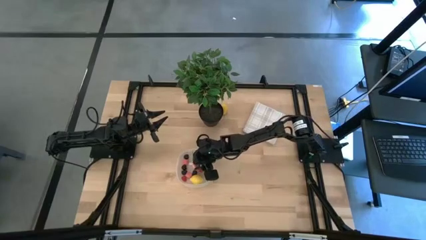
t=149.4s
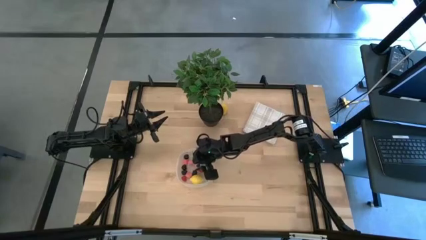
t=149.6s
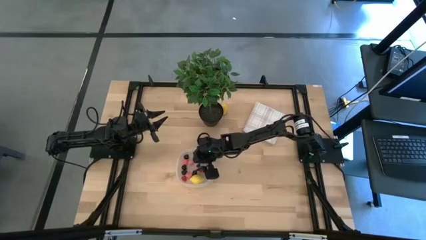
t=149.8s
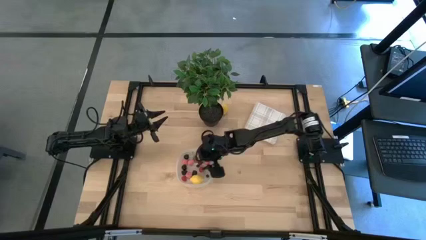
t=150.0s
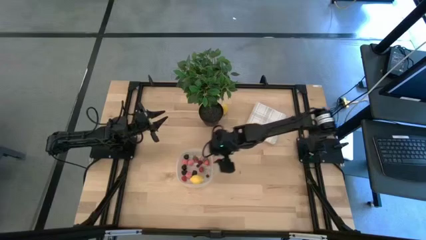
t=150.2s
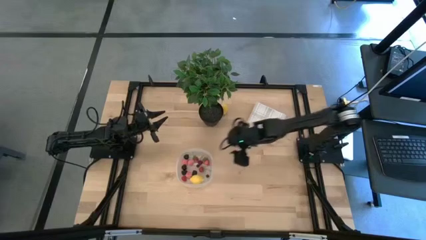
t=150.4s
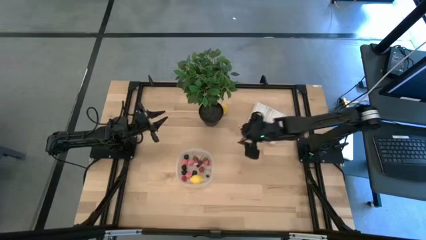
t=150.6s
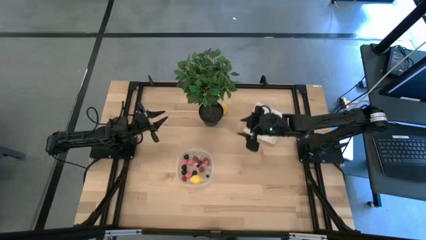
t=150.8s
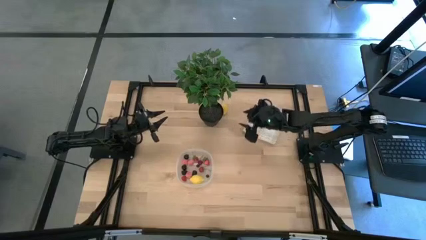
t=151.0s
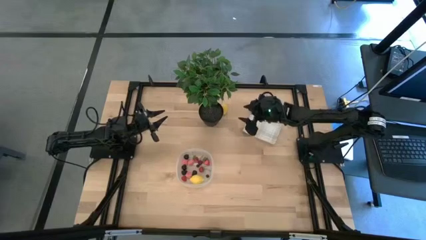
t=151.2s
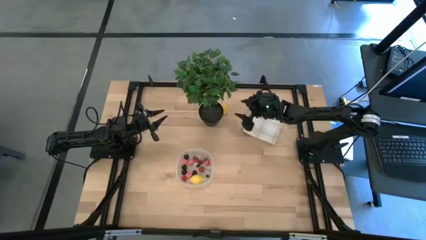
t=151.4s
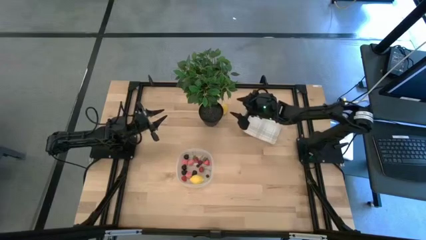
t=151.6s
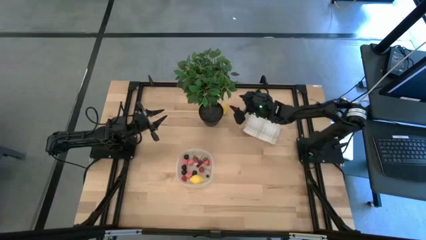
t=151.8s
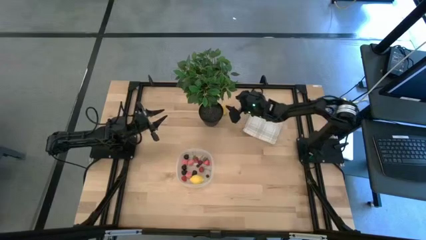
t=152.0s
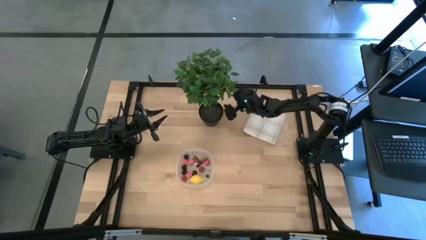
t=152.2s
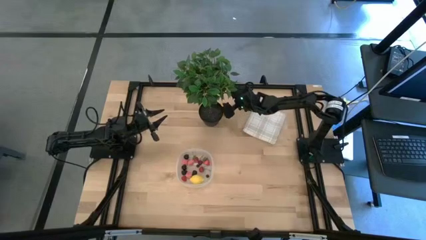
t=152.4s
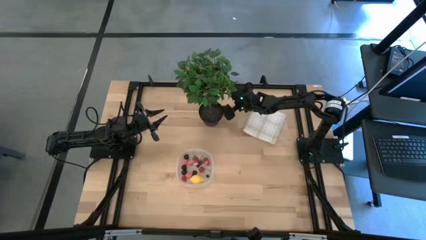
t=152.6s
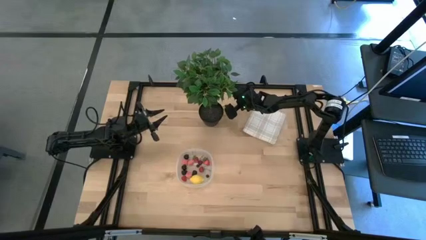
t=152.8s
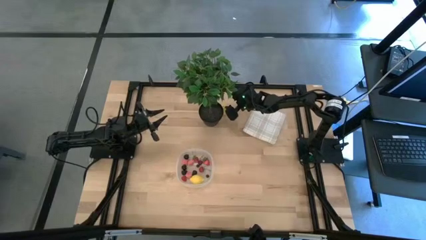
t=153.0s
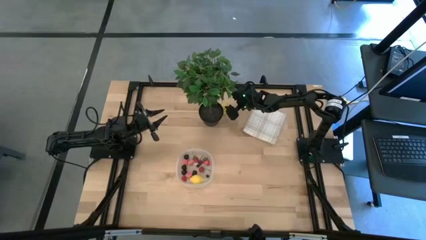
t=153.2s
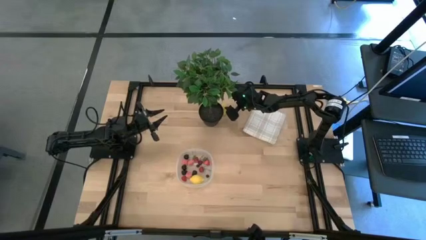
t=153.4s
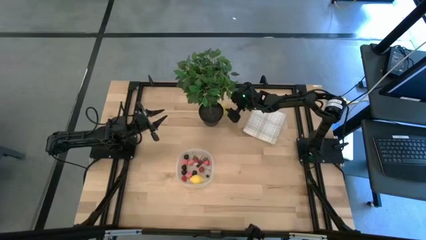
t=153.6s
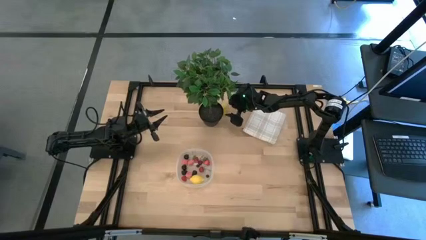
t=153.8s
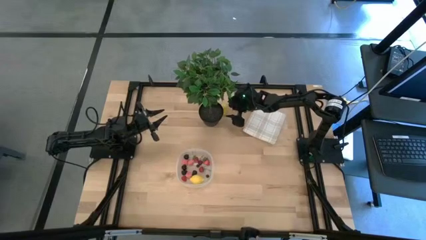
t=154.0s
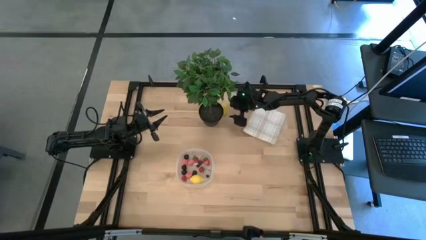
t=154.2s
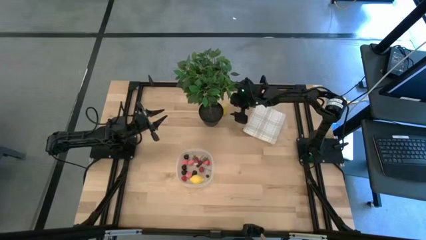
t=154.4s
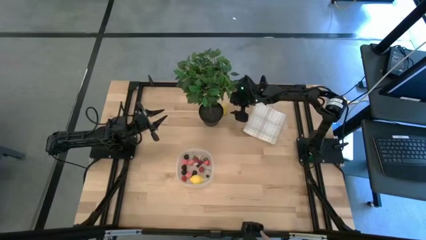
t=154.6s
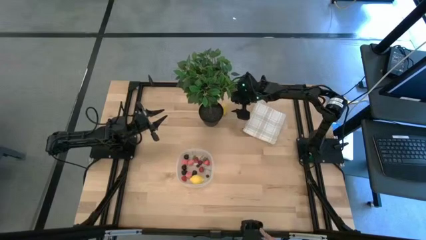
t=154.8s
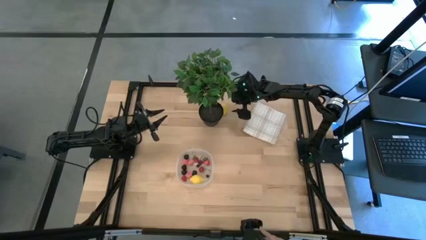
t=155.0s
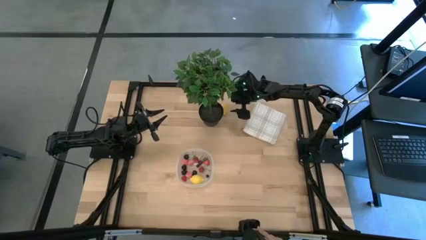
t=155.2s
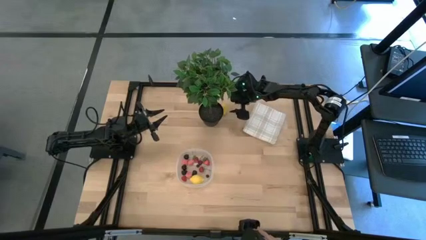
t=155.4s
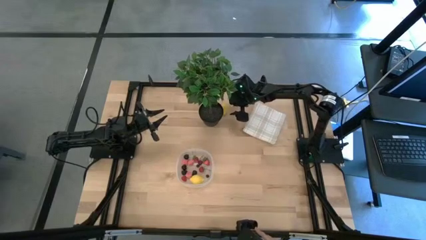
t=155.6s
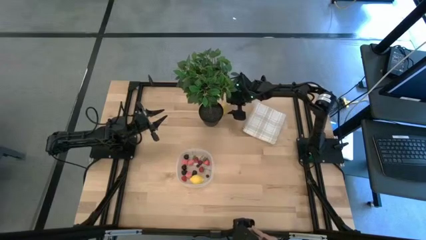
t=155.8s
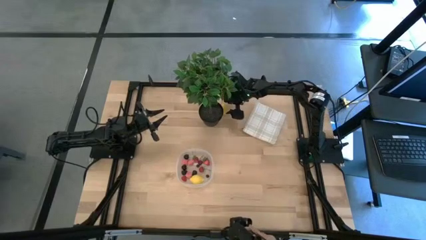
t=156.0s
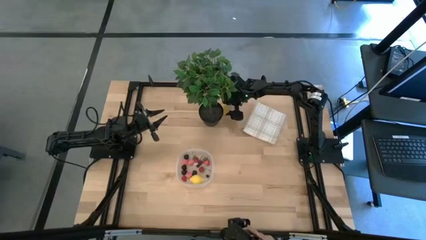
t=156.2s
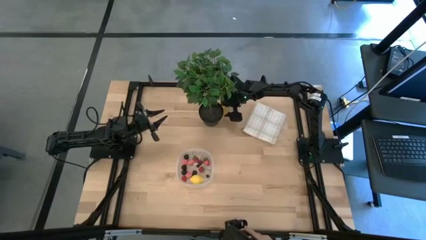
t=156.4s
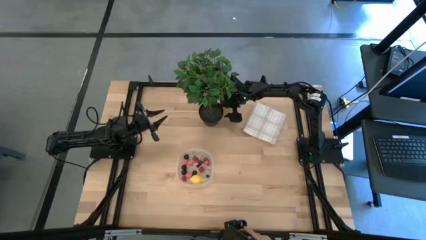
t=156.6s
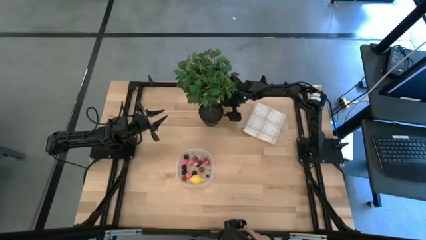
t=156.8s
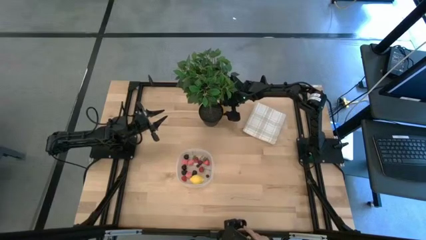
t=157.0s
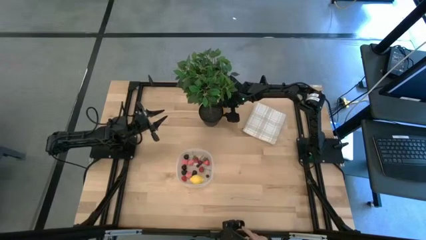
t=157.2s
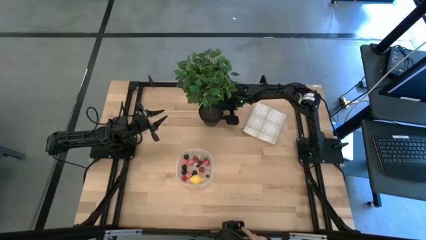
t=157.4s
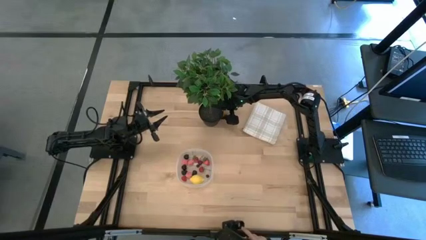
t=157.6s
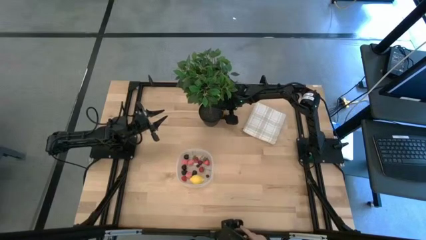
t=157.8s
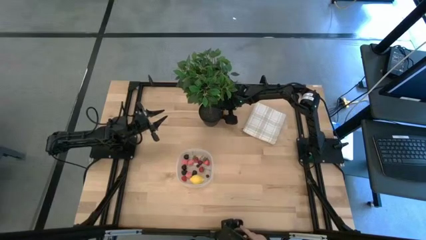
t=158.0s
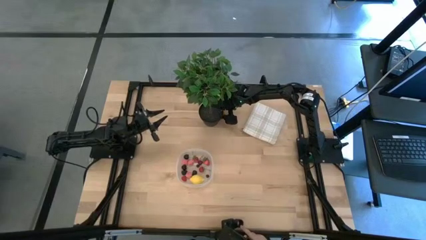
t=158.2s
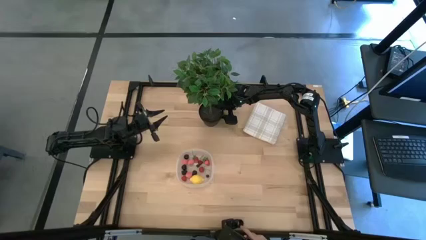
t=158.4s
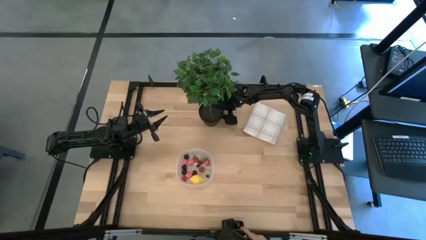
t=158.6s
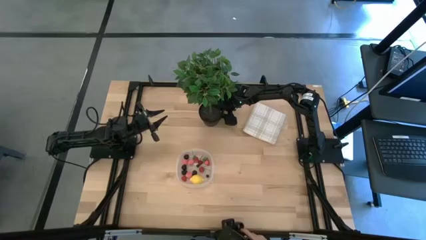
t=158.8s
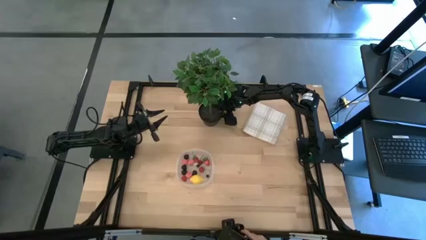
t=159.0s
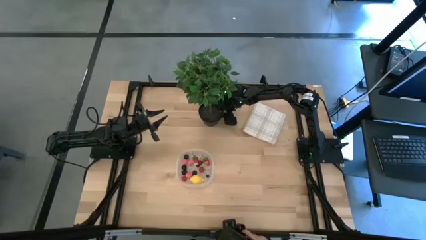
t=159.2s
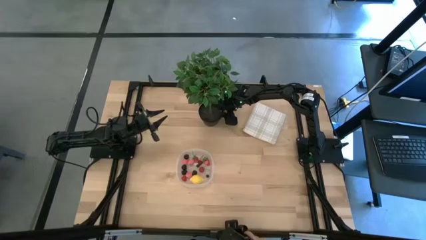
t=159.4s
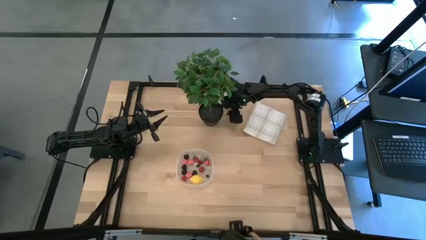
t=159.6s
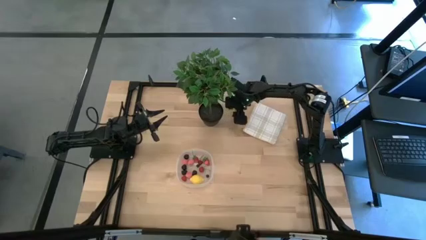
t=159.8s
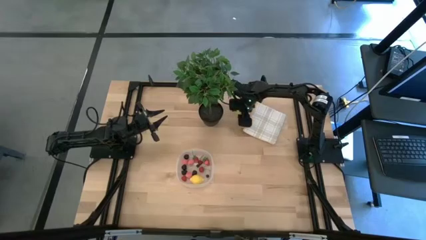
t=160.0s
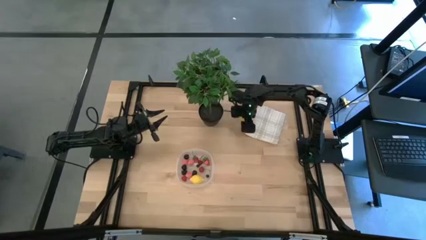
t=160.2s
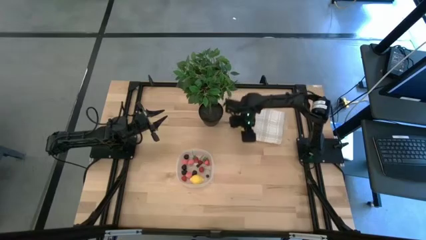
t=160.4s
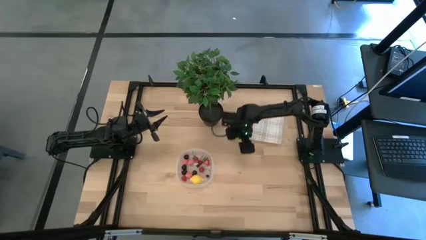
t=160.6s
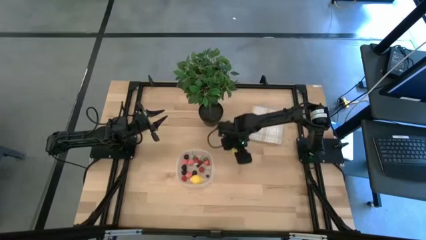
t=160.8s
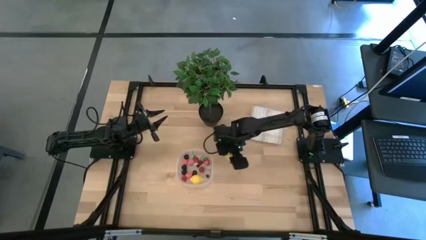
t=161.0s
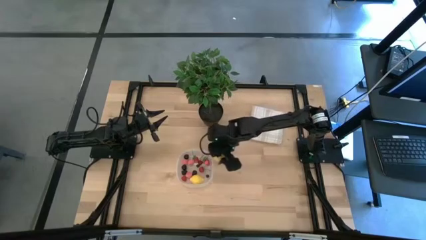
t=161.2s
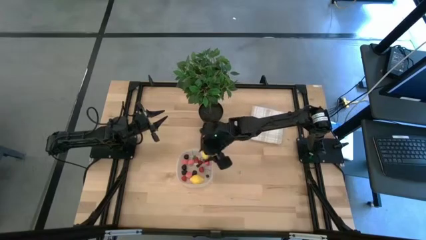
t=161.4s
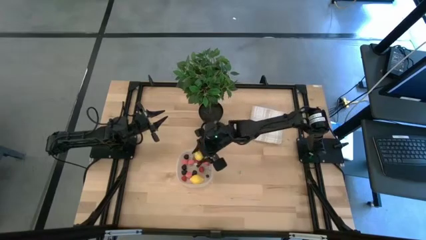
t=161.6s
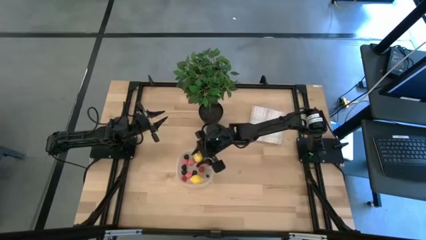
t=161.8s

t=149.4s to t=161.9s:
Task: Pick and placing Produce into tupperware
Put the yellow lemon into the transparent bin

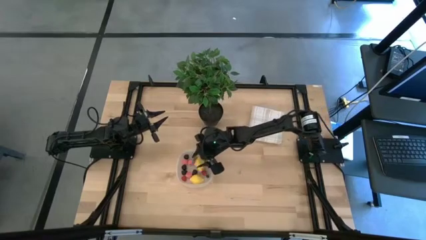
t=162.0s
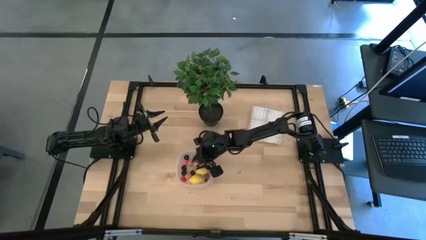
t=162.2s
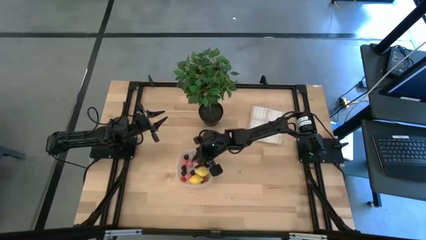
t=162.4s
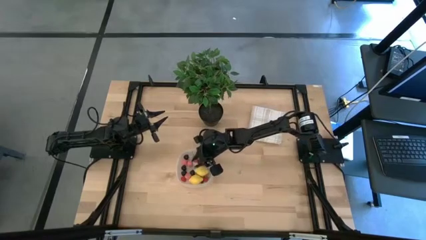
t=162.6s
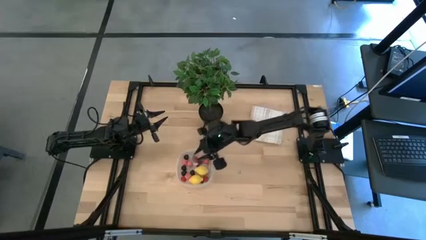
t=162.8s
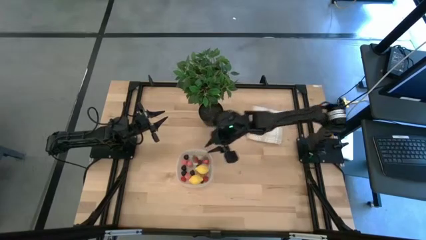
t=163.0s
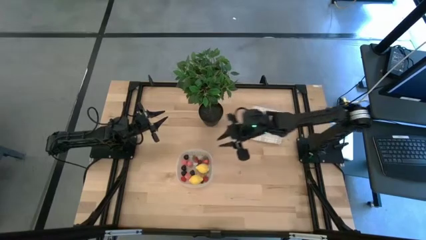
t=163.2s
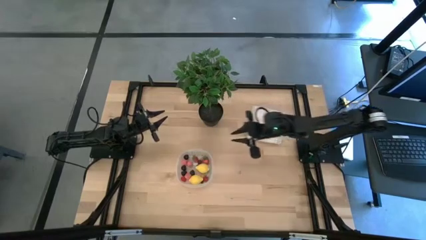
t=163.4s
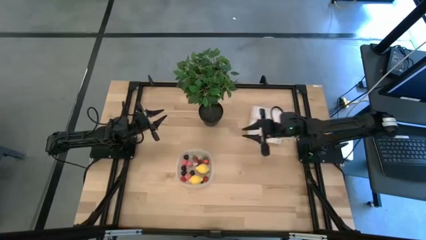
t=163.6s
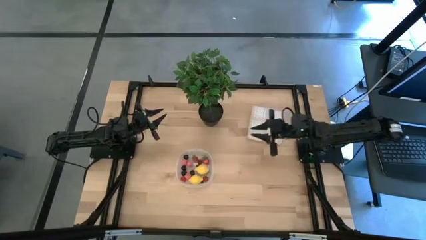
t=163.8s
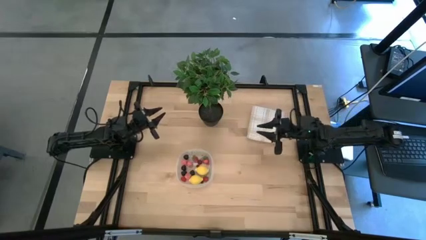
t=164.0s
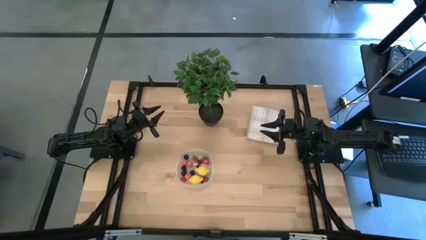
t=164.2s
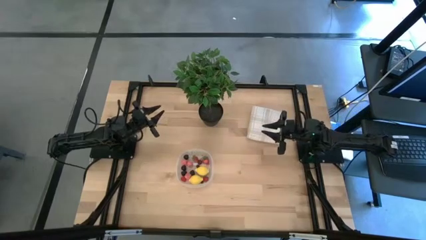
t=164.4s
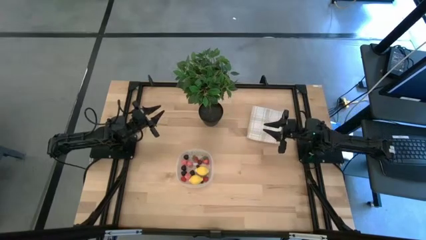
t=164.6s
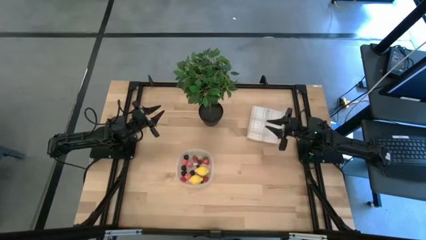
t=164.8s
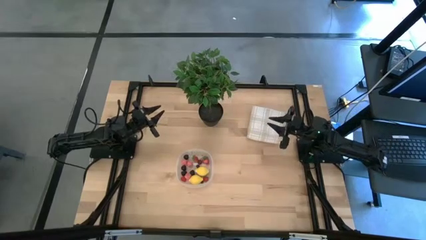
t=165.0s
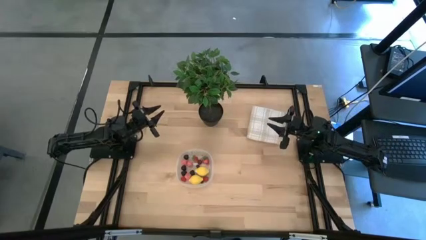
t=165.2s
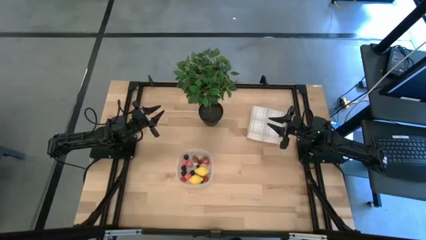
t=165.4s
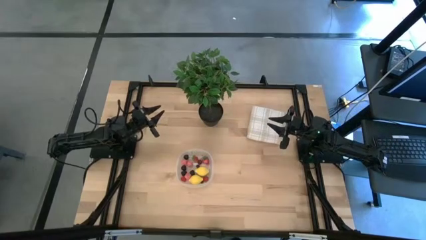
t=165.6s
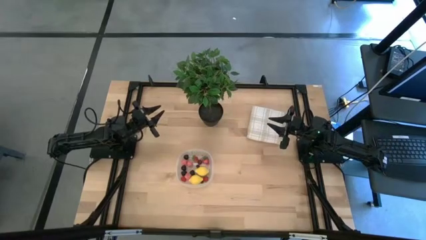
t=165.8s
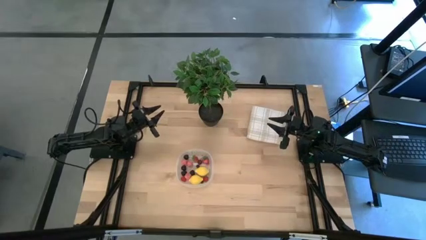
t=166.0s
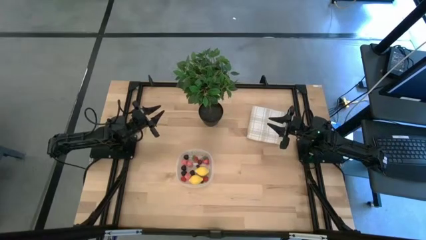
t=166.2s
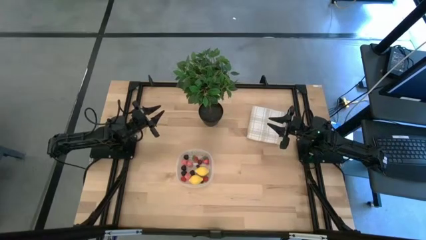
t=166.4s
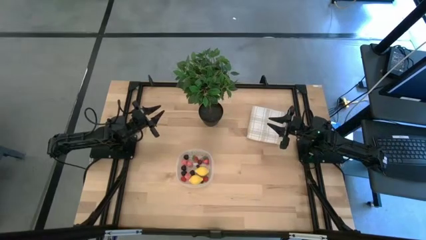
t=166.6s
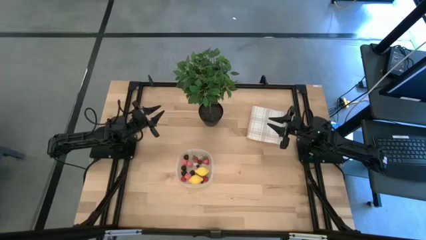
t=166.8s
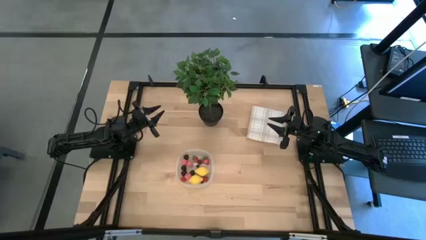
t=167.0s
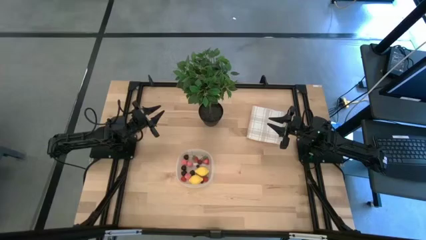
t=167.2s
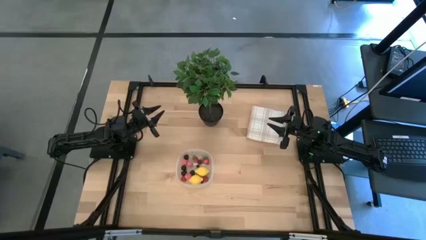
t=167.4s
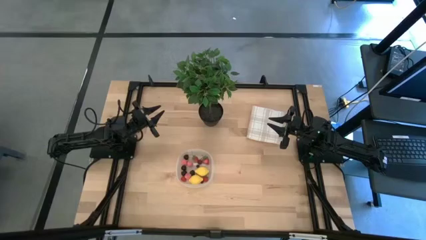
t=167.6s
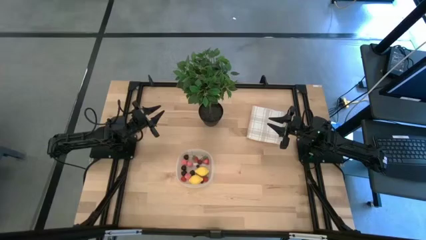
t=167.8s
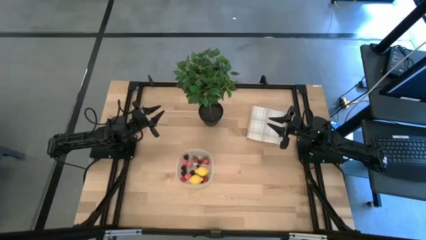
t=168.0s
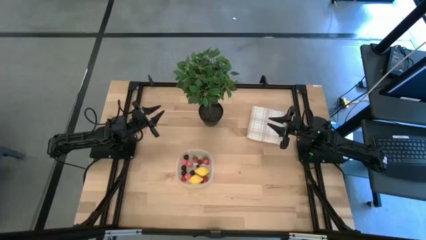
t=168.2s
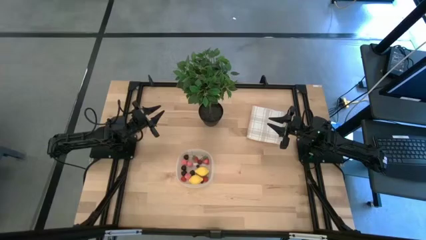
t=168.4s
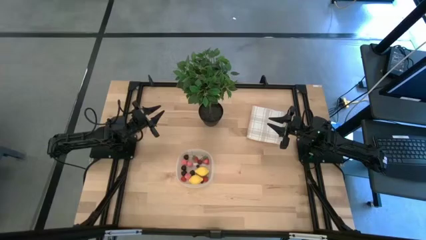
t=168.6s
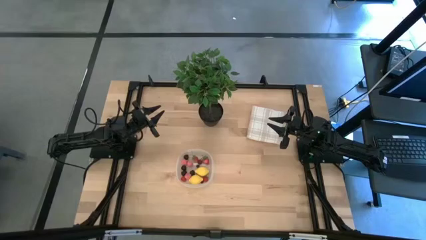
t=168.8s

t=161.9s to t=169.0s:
Return to Home Position
